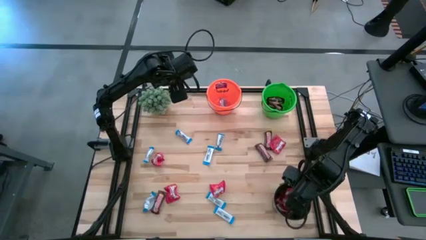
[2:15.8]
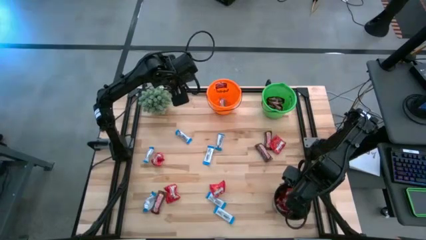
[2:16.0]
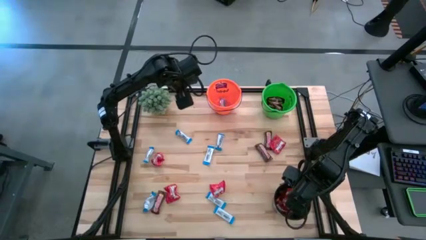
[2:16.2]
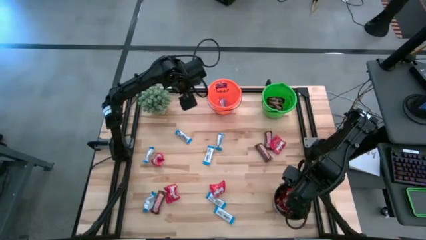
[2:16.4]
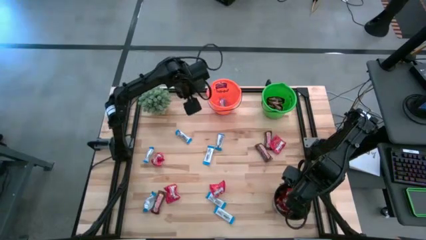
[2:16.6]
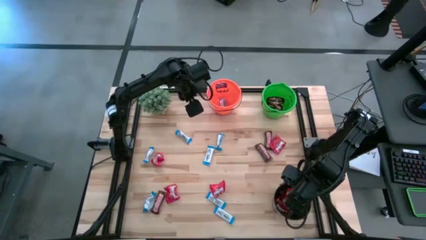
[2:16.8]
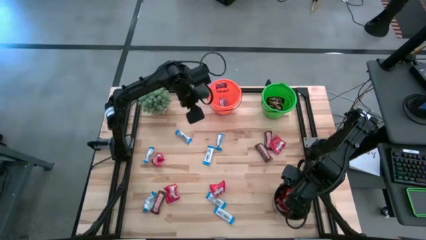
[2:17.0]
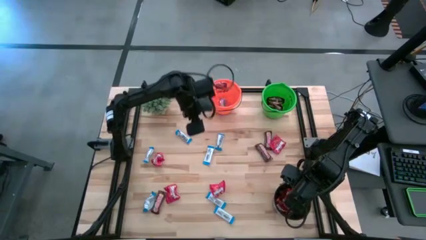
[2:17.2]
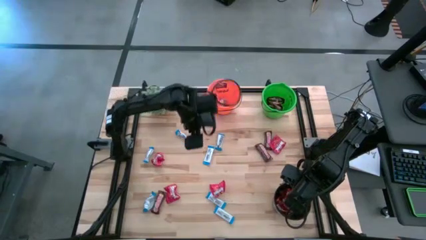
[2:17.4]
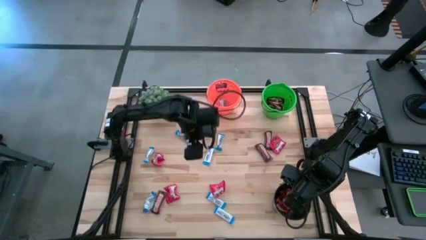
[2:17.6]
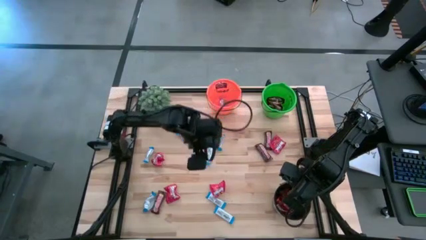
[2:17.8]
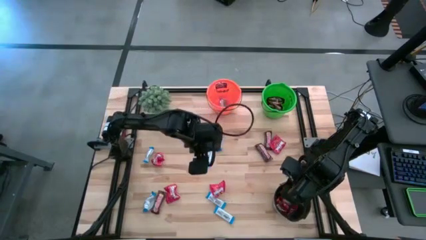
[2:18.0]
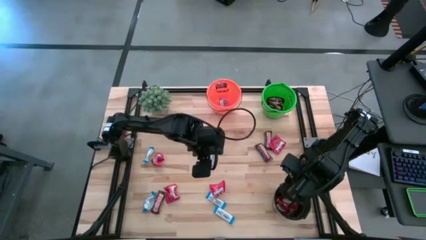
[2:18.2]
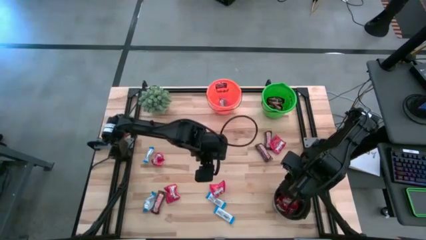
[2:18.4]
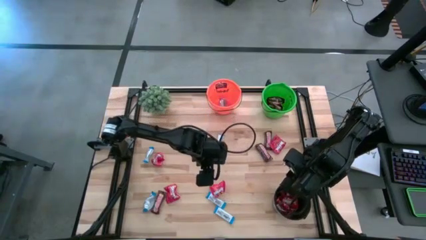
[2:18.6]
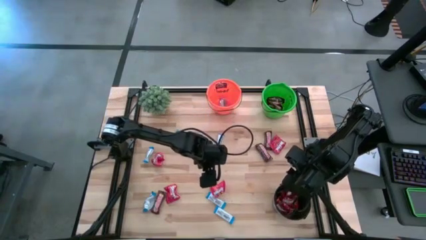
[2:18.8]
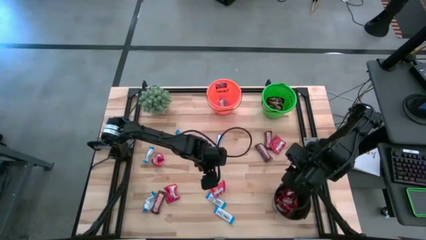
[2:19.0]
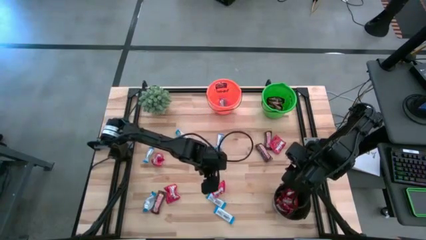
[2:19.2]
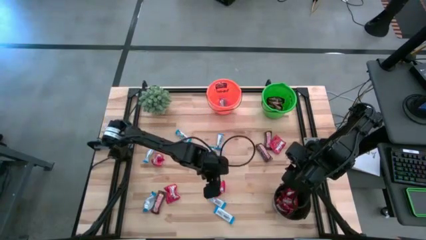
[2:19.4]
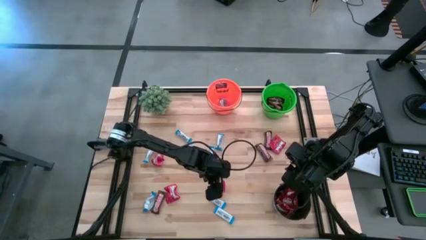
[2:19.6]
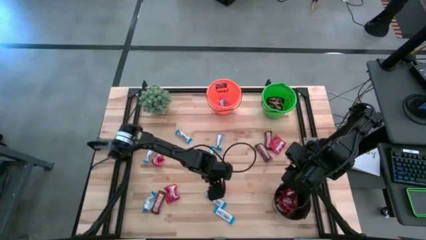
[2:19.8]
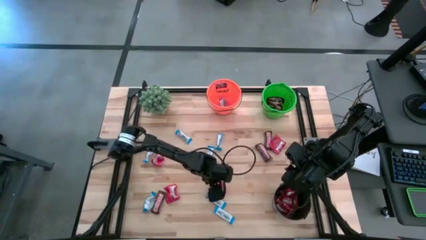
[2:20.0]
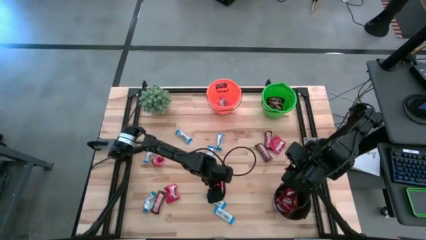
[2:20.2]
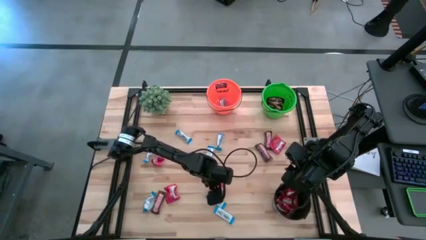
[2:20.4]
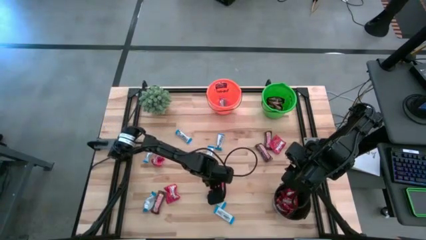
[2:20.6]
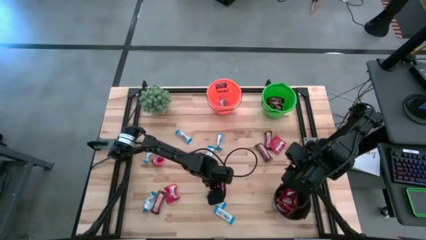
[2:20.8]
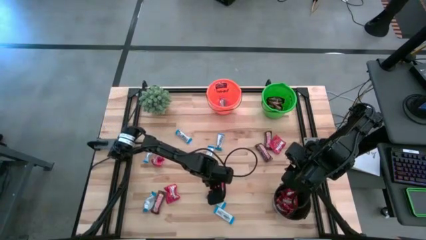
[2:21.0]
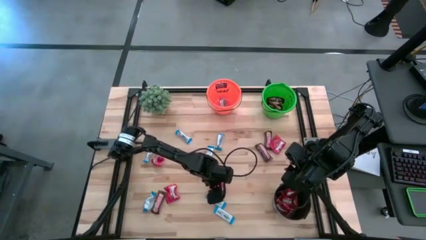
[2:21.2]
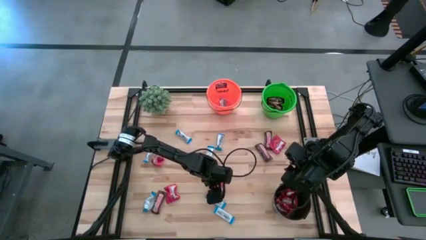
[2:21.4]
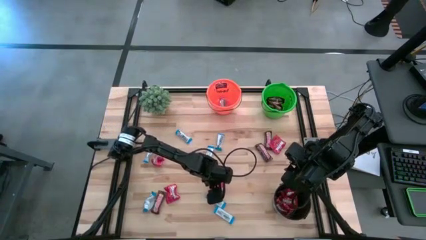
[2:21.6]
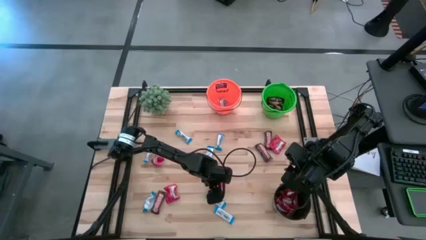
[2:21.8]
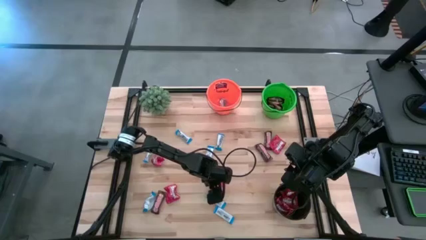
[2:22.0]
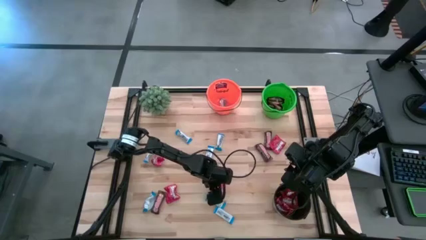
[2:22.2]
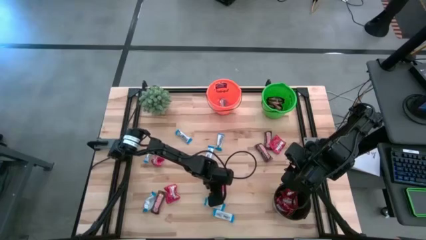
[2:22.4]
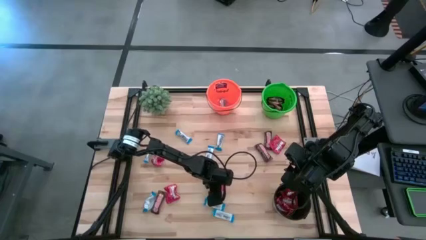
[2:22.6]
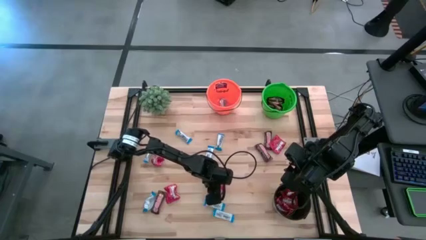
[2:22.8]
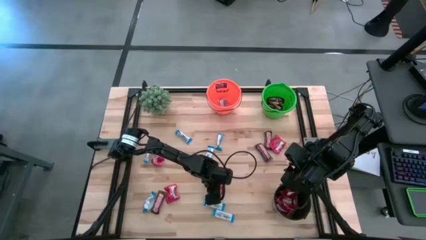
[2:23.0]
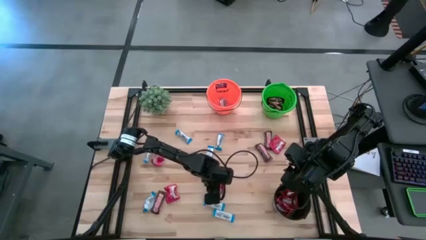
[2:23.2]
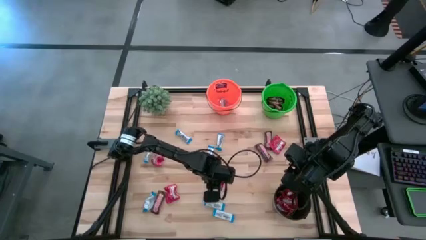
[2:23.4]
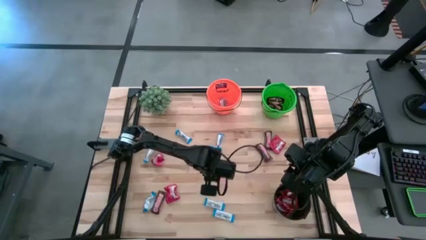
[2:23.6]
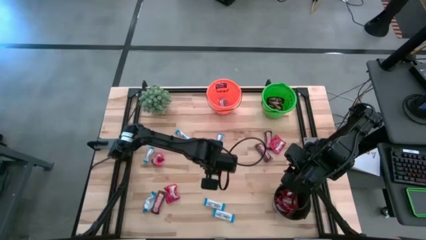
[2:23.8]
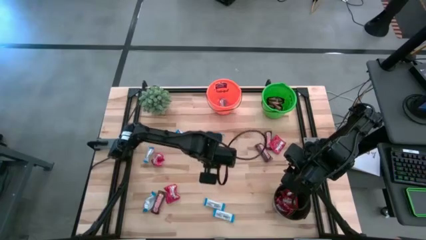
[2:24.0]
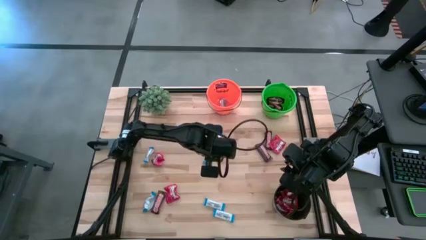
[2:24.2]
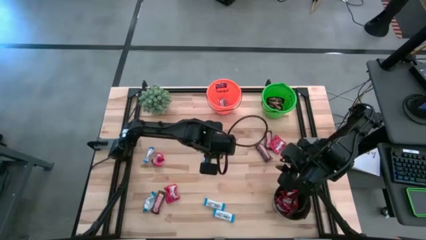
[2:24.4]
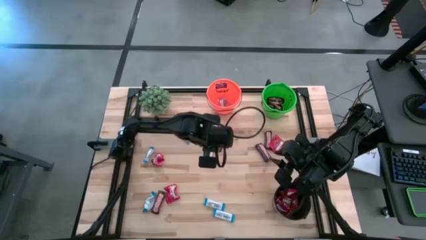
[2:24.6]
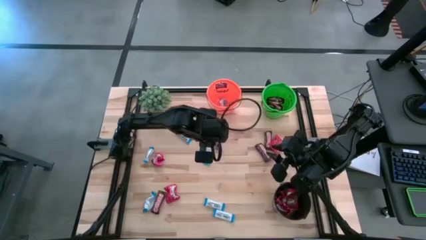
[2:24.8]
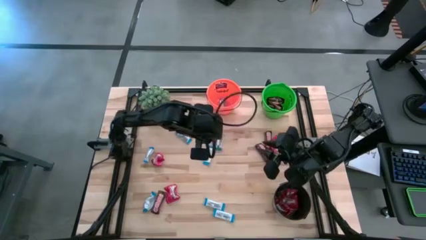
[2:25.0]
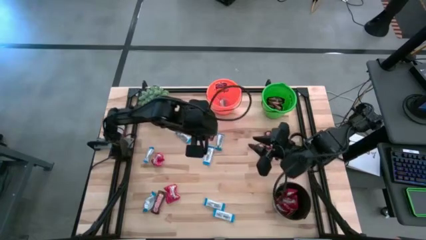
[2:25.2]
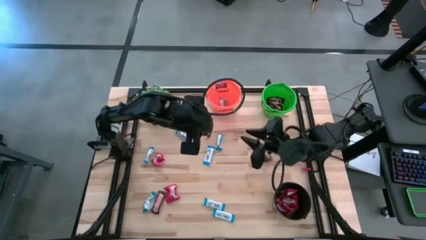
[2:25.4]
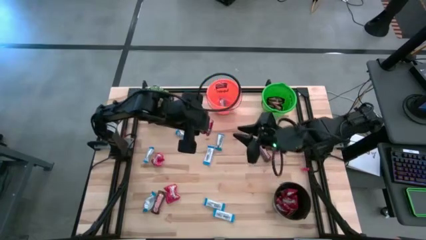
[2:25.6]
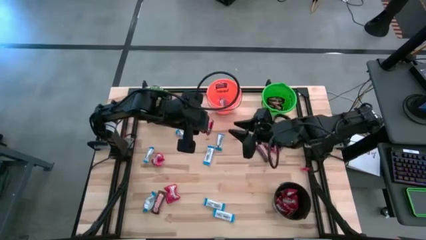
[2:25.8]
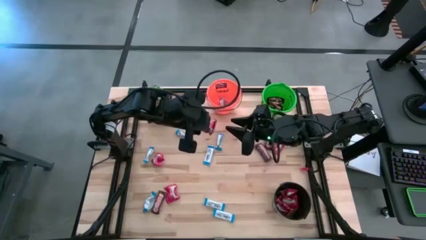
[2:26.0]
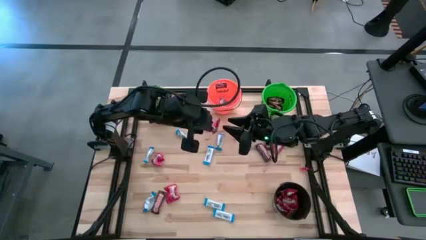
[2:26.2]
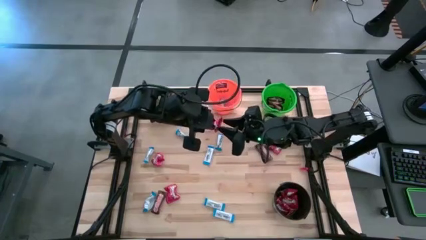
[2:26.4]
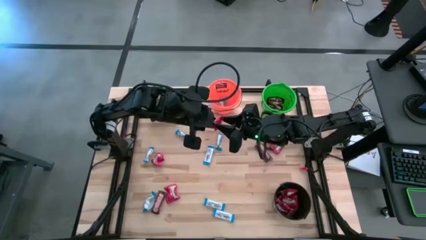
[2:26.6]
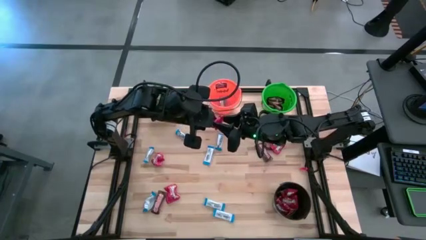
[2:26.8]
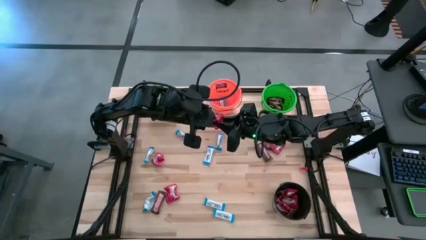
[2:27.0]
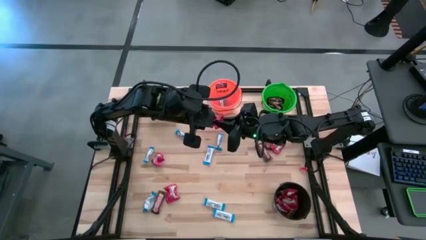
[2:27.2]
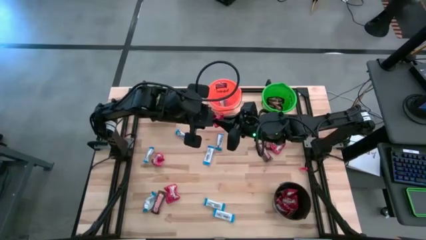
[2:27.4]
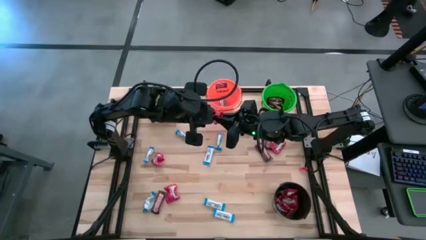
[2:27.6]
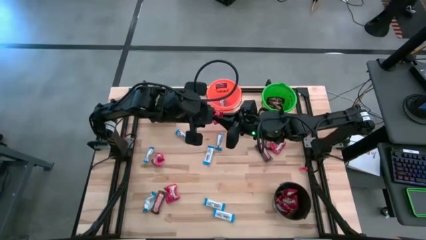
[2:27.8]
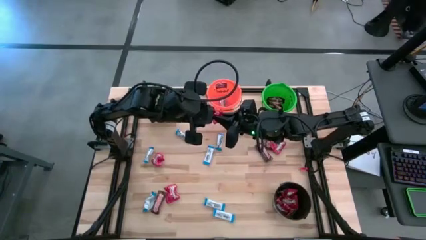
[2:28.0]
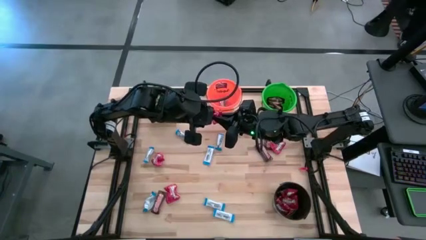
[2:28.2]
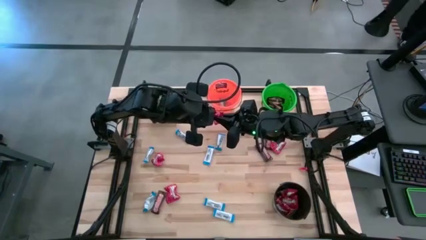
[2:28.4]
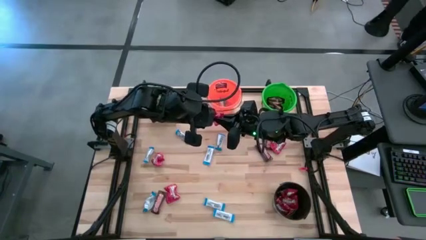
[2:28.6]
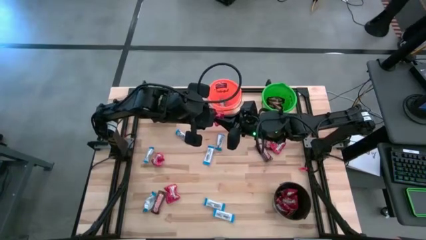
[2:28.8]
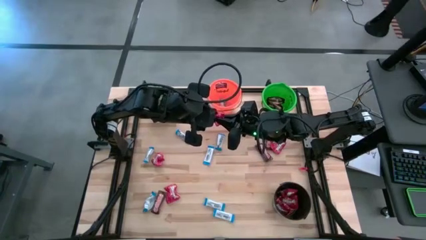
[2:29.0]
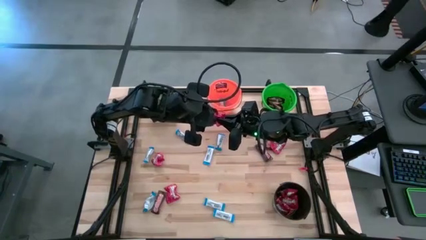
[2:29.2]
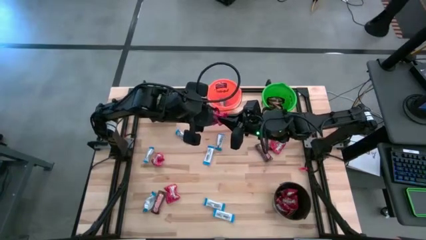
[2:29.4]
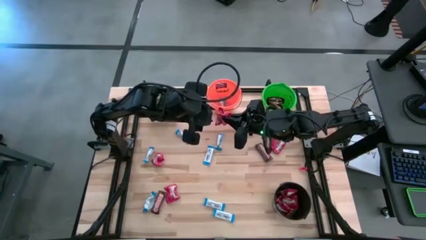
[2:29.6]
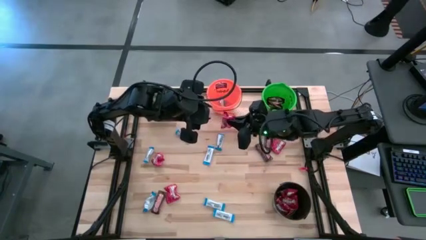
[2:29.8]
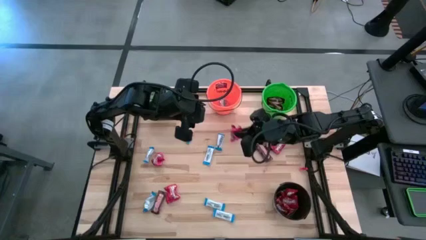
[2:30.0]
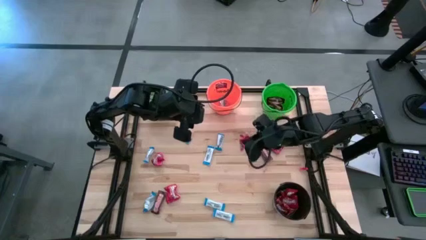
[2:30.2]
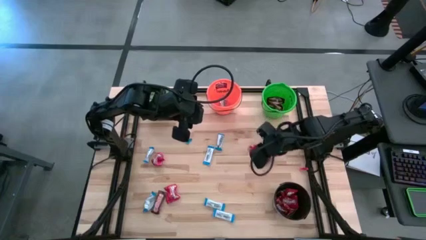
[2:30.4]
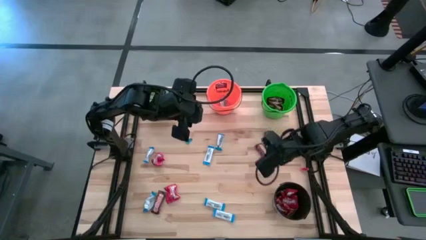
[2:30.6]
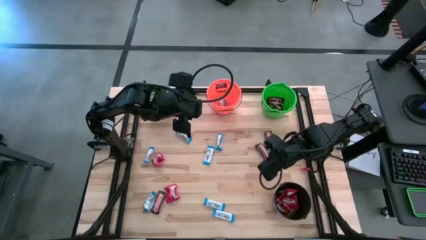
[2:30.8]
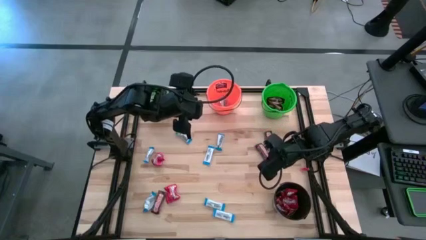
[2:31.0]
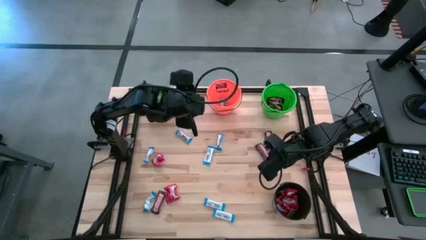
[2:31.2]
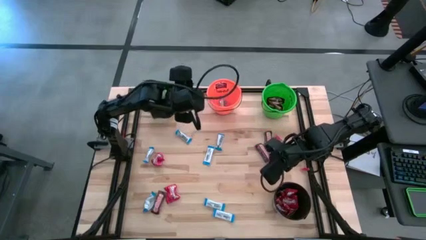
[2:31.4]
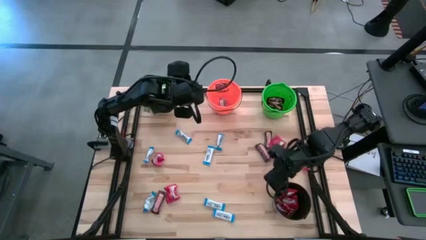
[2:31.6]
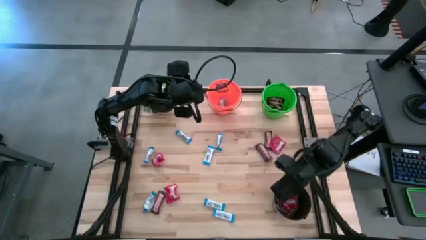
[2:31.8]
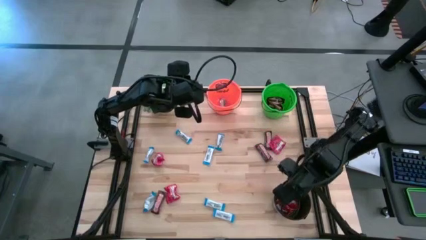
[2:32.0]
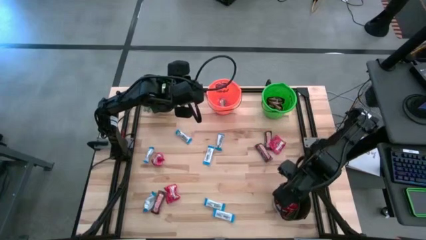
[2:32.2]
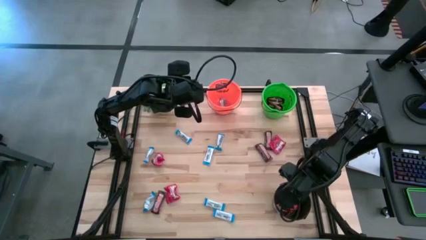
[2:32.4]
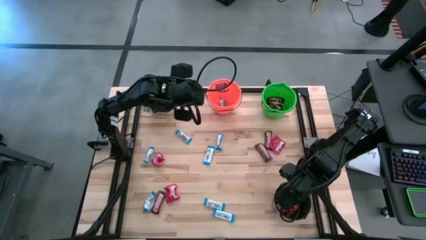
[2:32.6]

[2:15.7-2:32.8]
Task: Organize candy in baskets
Put the red chocolate into the black bucket
